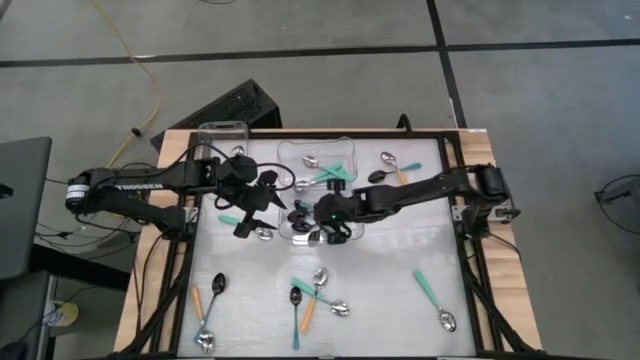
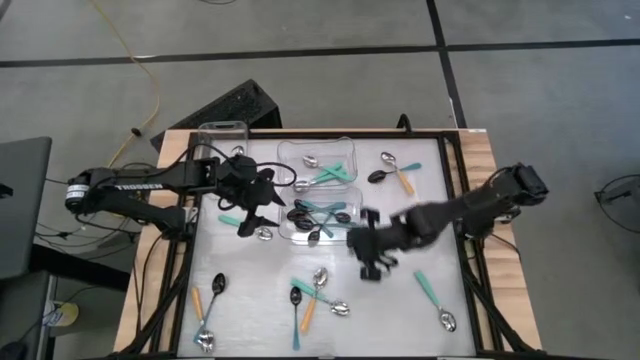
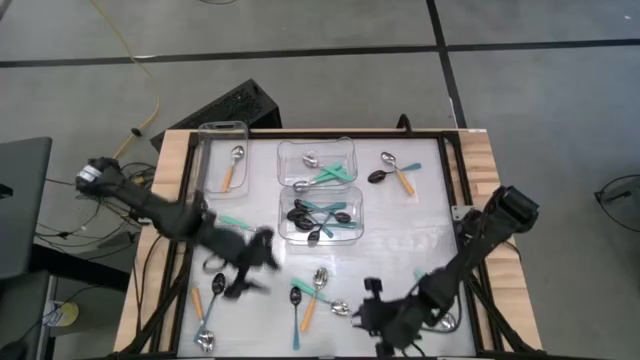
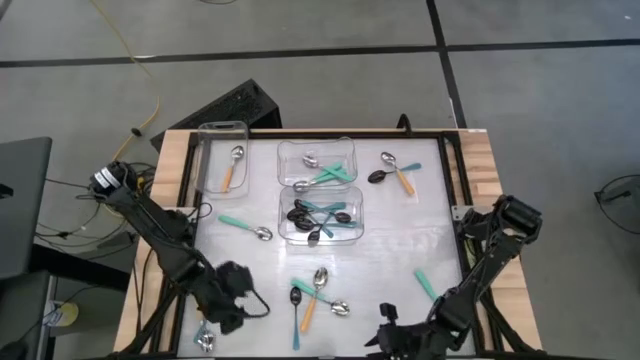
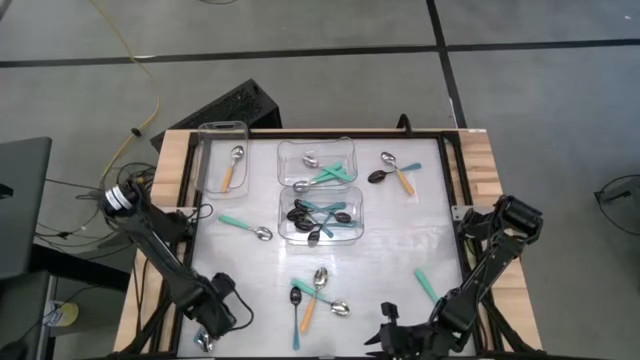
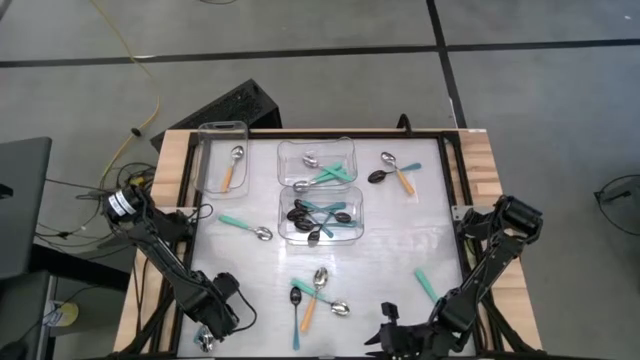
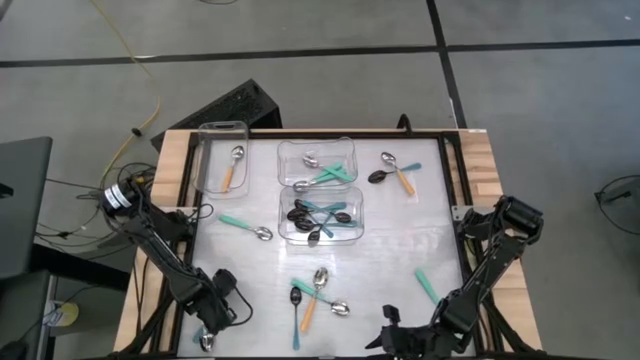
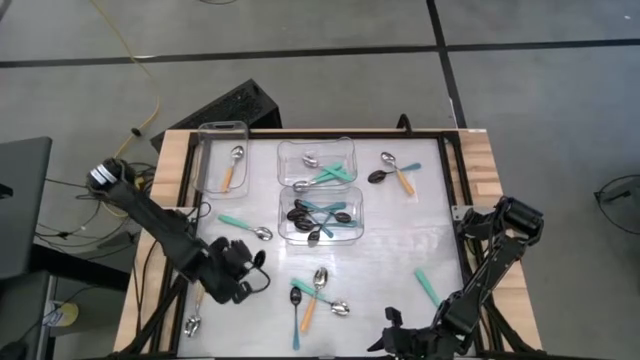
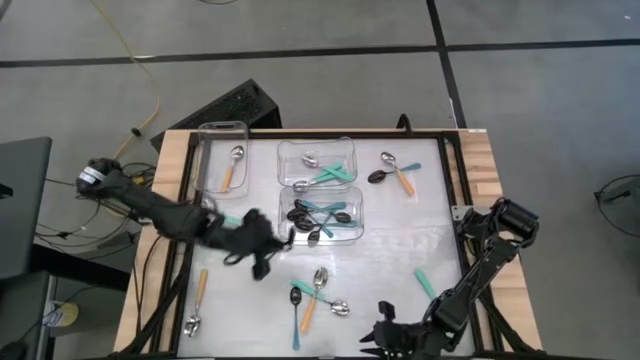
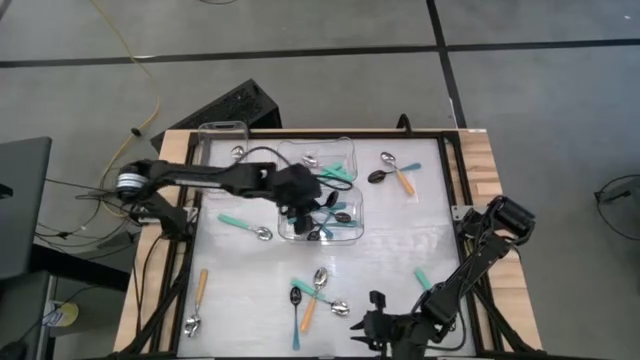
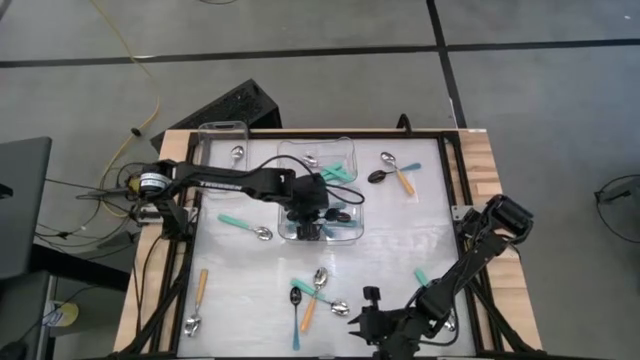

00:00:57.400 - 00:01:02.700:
Task: Sort silverware by color (type)
Put the blue spoon into the bottom transparent bin

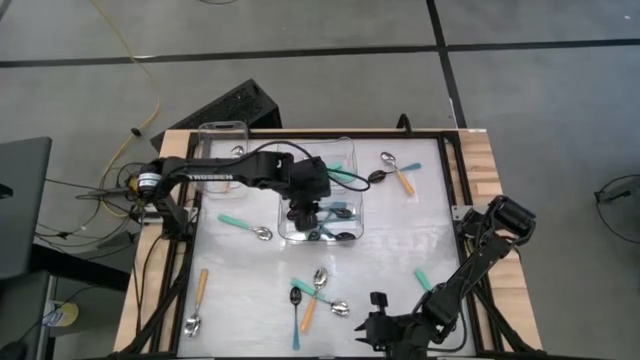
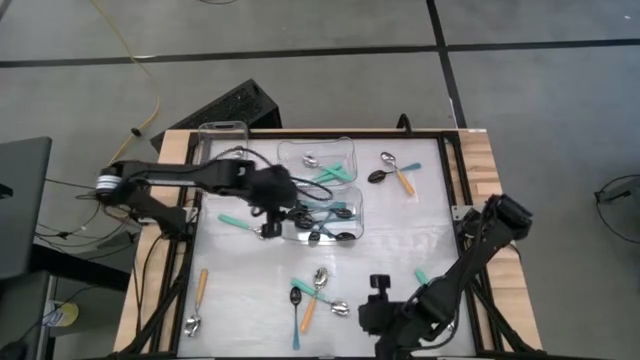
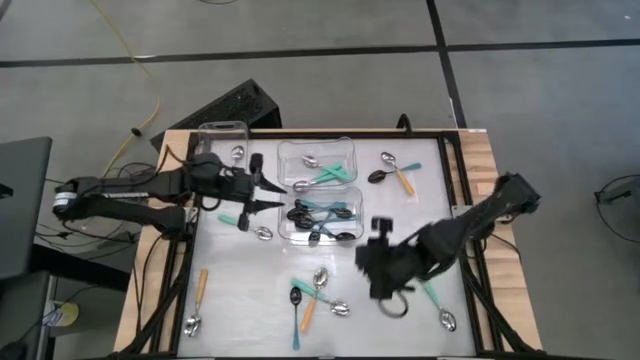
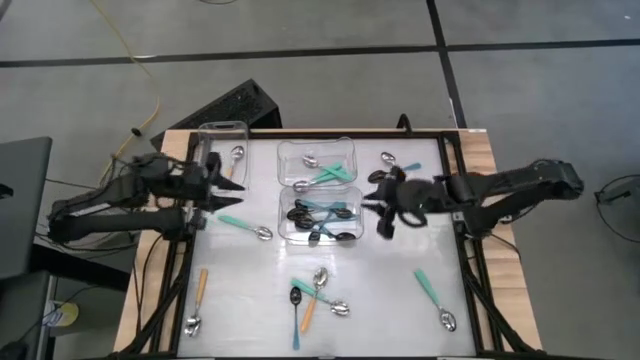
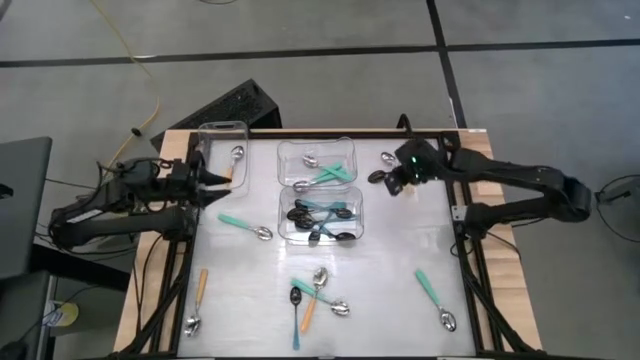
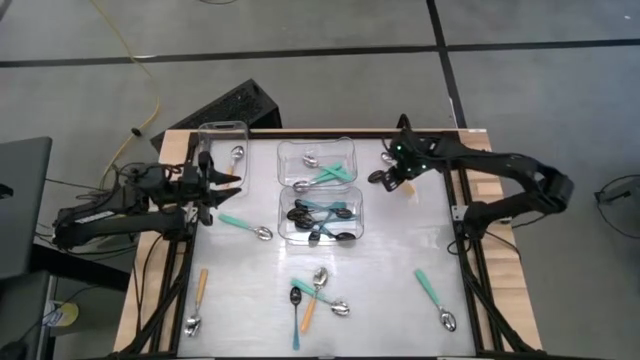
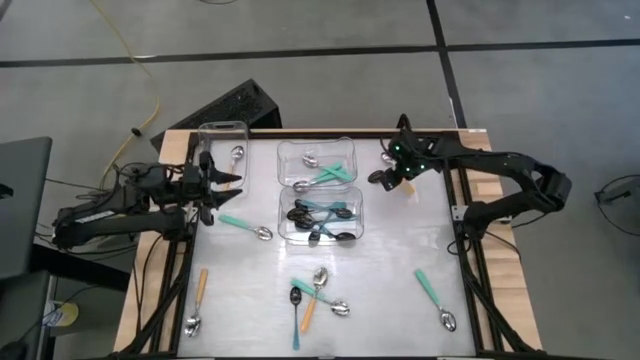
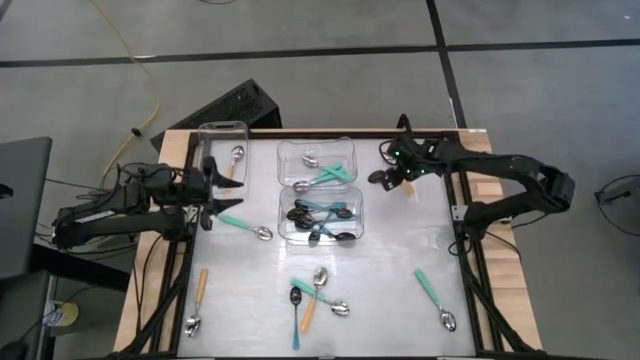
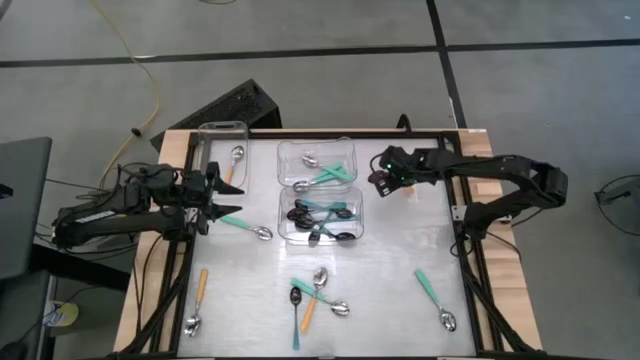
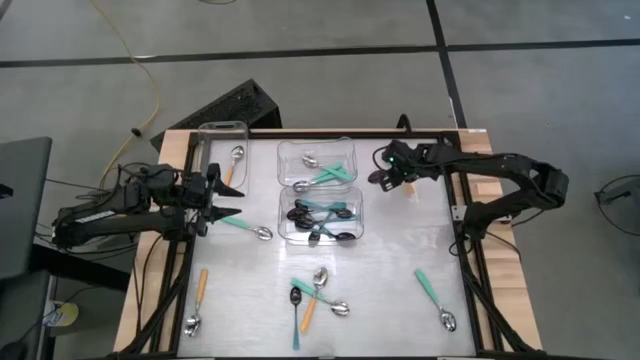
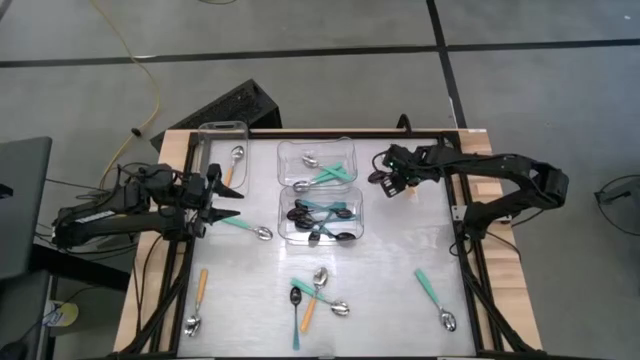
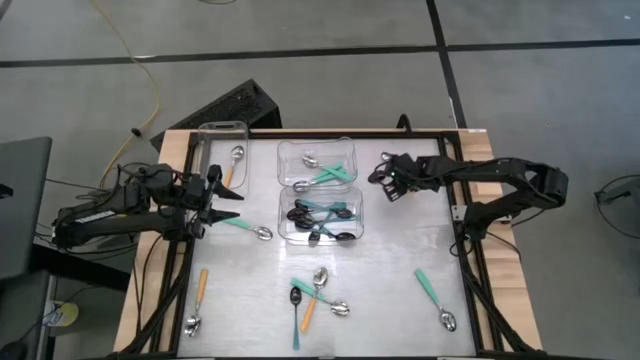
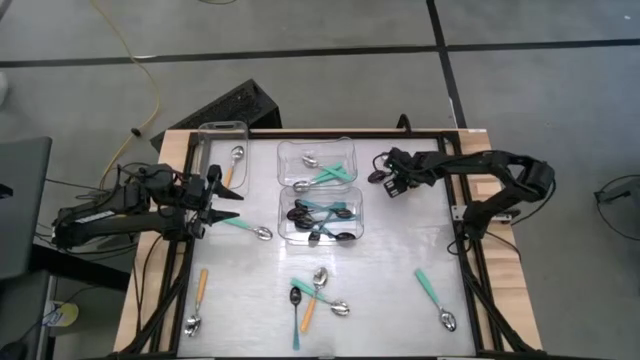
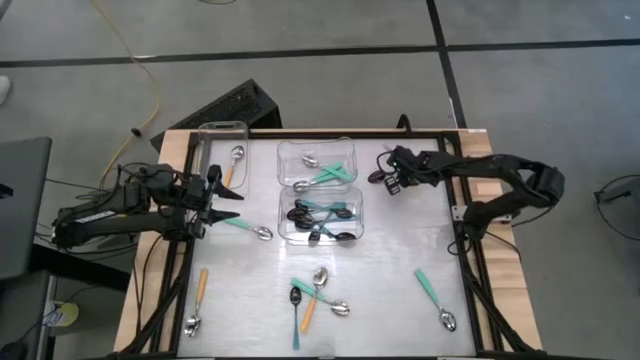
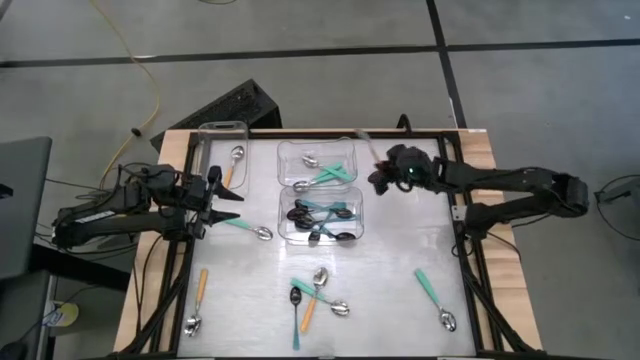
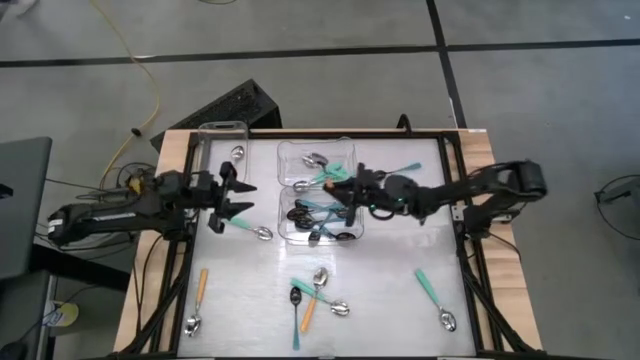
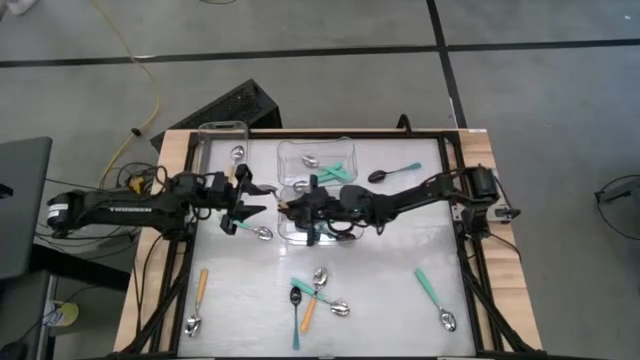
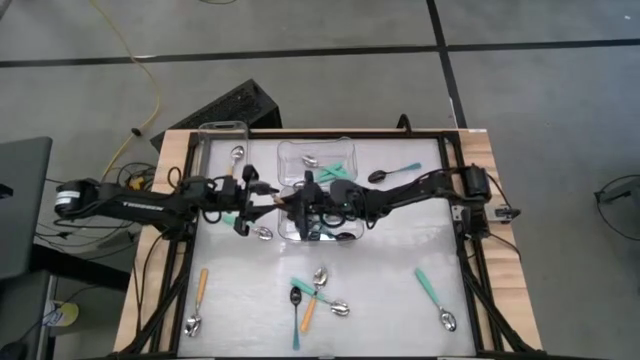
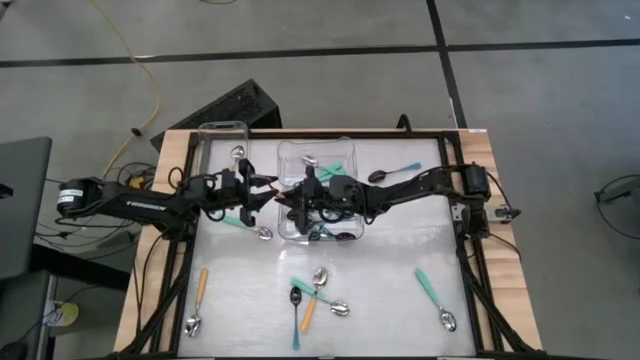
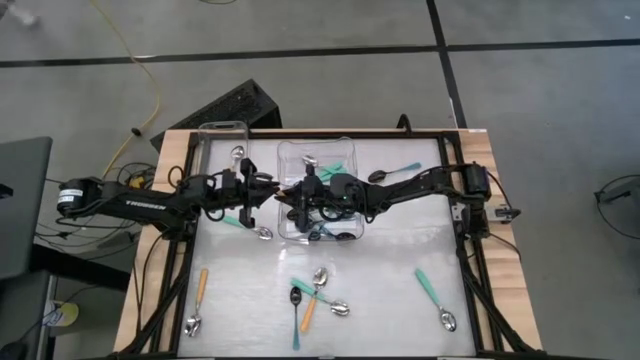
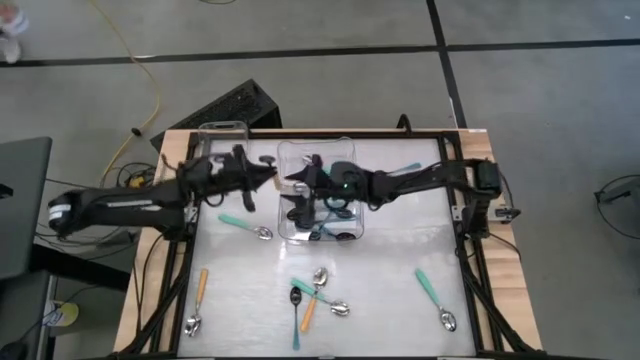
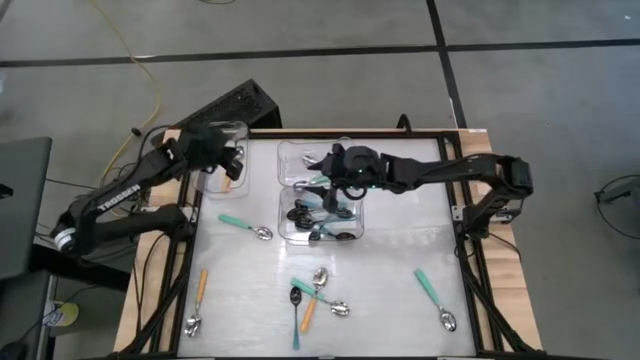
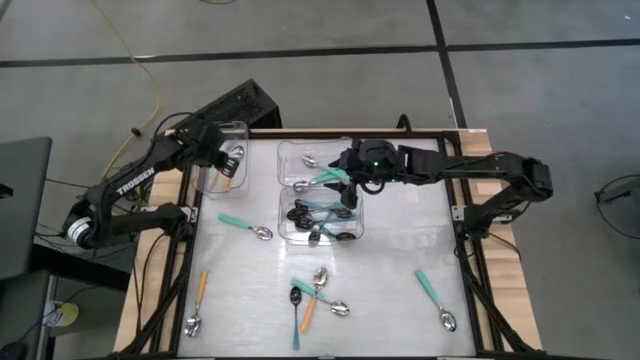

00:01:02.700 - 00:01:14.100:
Put the yellow spoon into the top left transparent bin

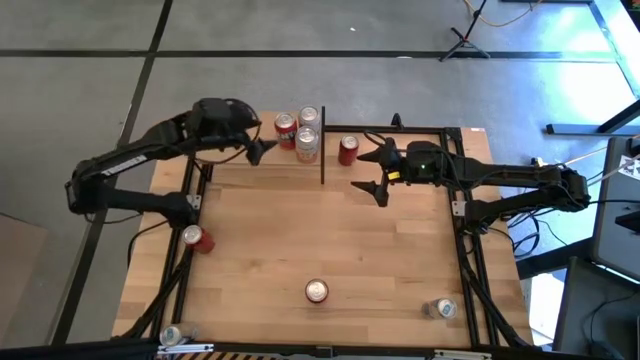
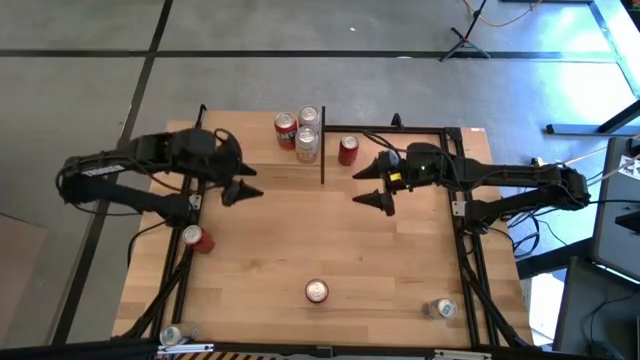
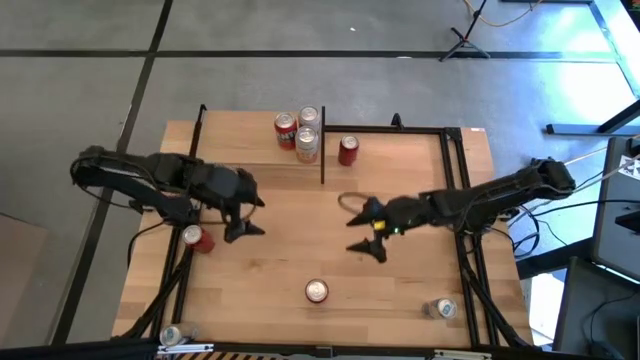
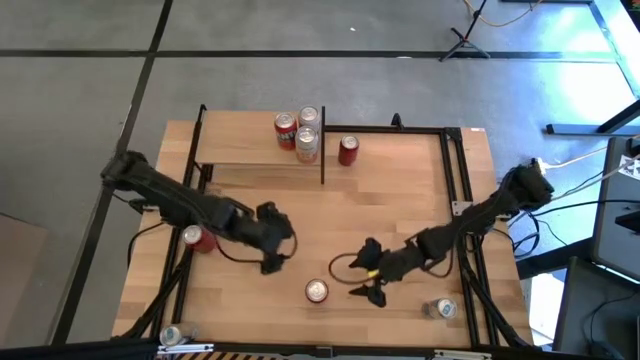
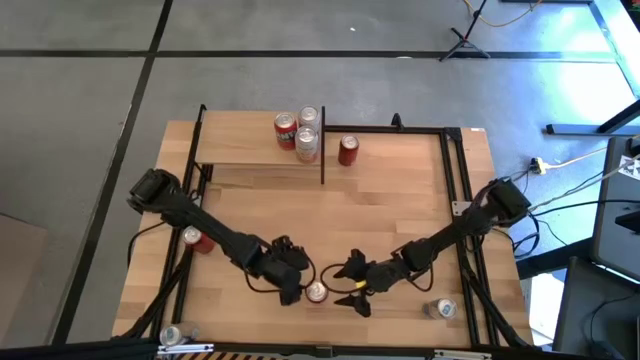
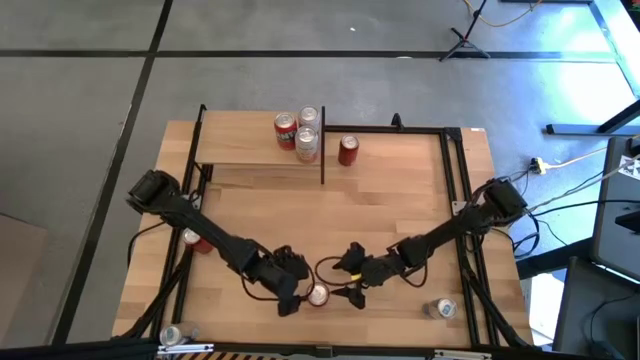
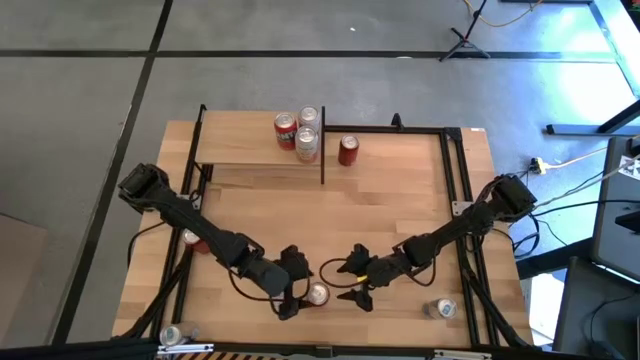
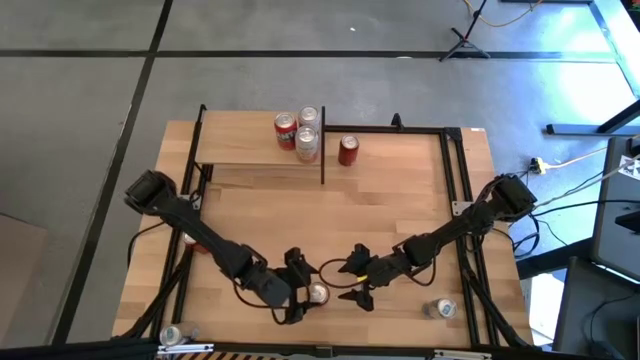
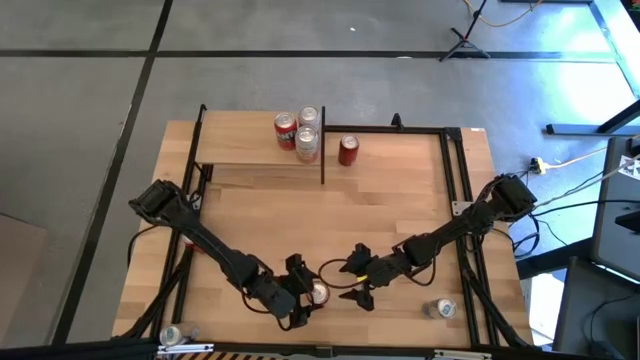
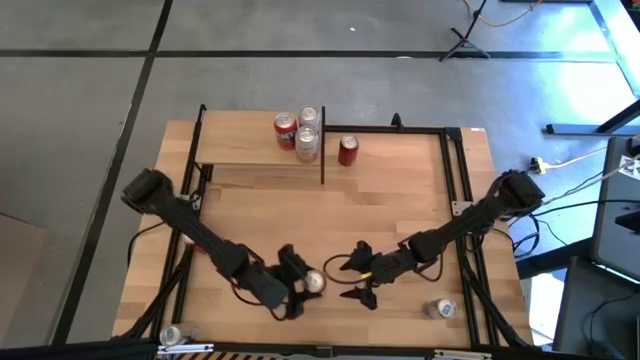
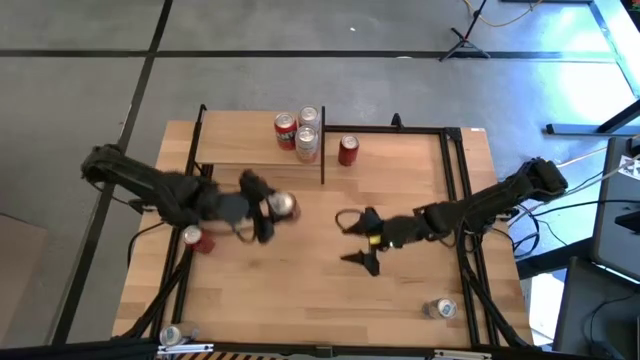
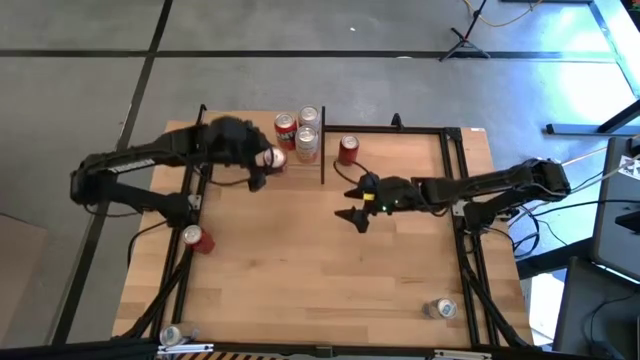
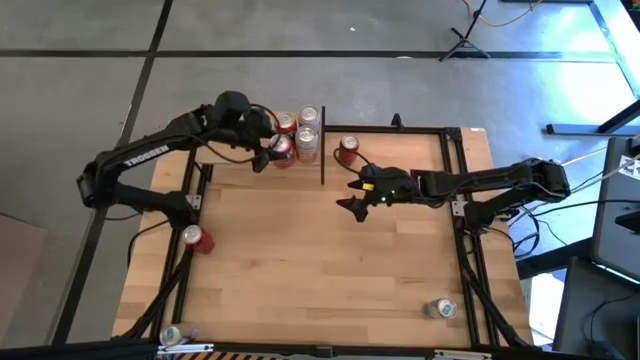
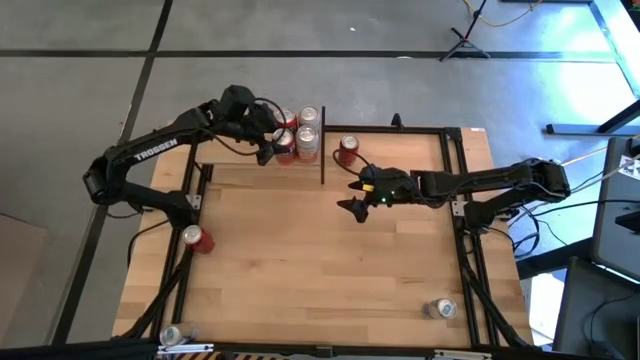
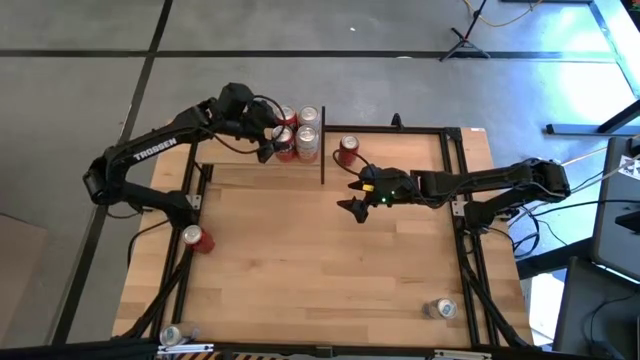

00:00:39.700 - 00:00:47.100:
Task: Place canned beverage on shelf
Put the orange soda can on the shelf aligned with the other orange soda can
